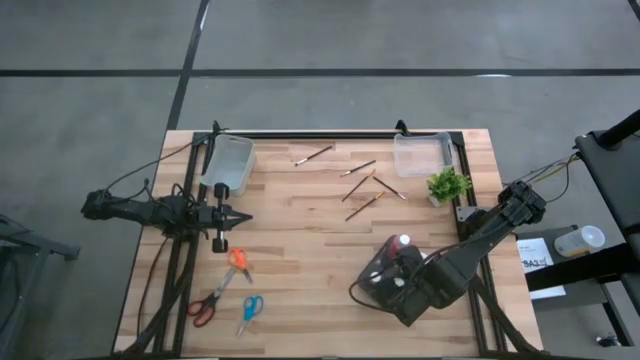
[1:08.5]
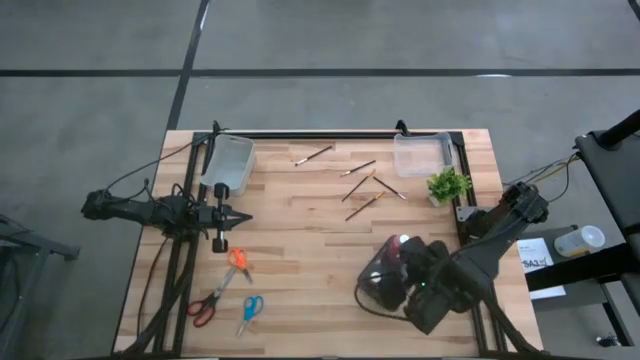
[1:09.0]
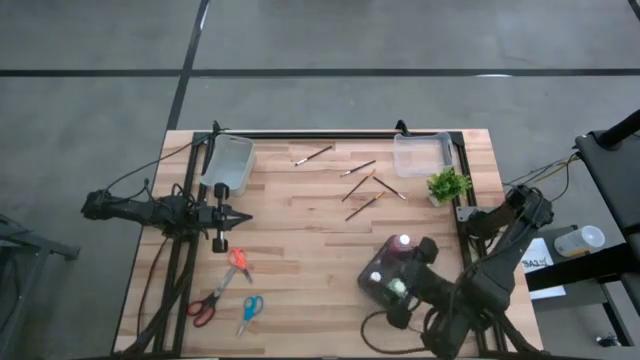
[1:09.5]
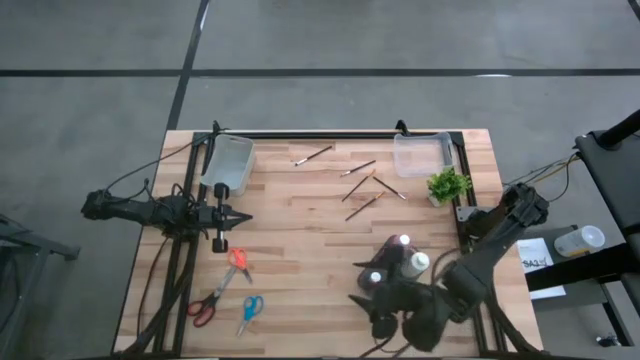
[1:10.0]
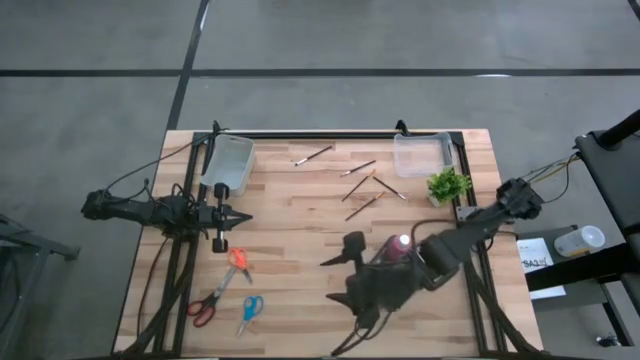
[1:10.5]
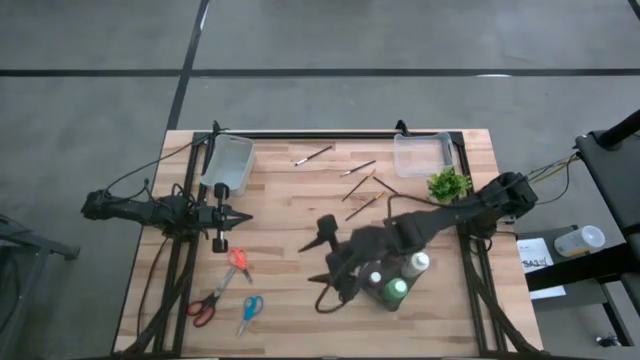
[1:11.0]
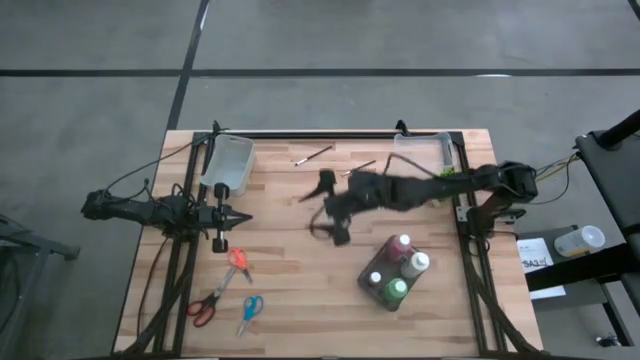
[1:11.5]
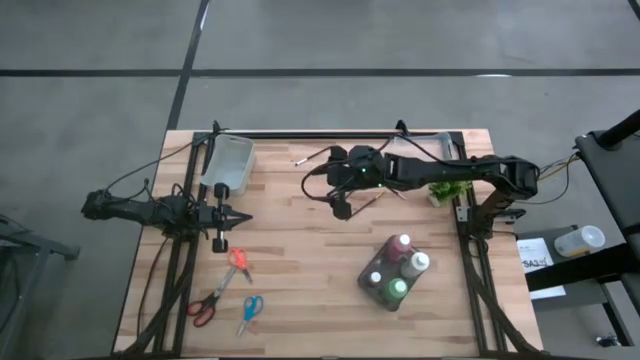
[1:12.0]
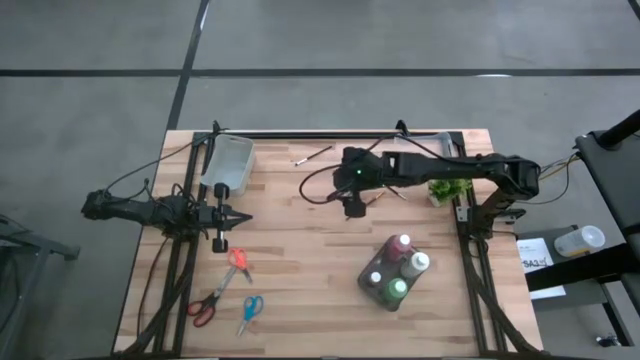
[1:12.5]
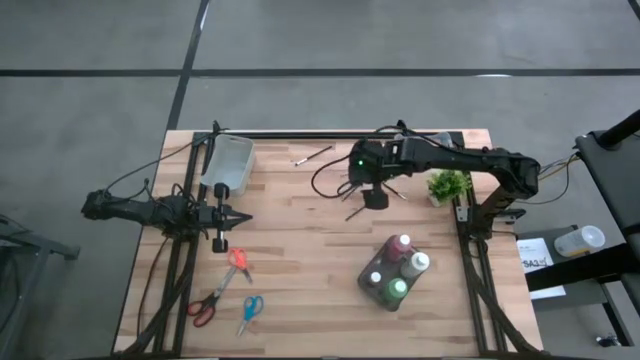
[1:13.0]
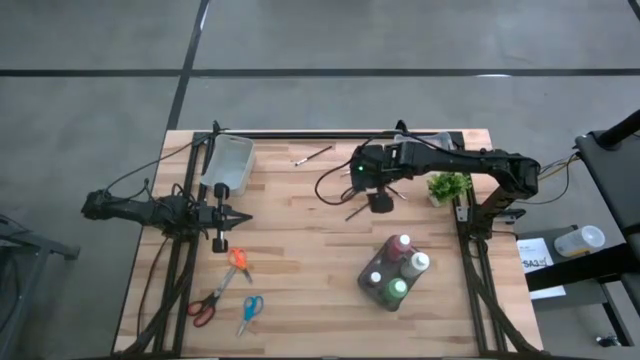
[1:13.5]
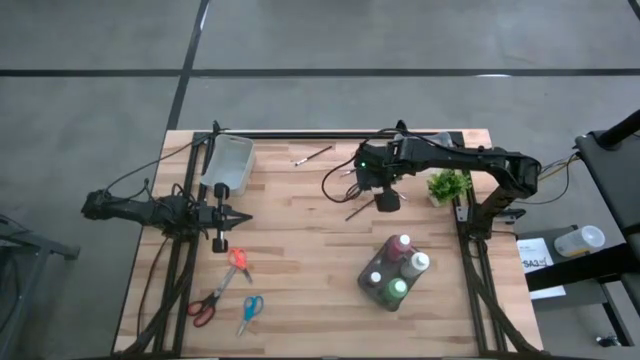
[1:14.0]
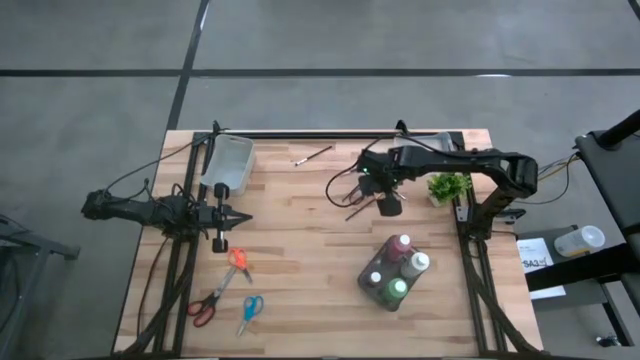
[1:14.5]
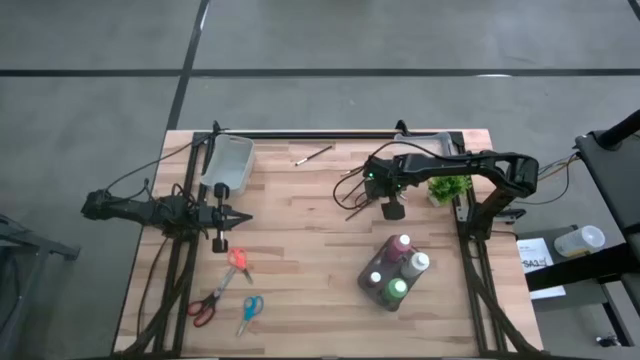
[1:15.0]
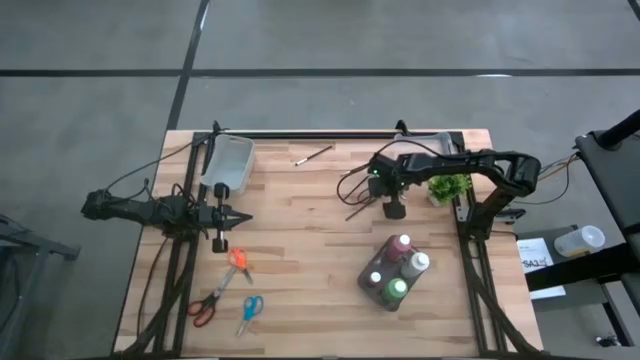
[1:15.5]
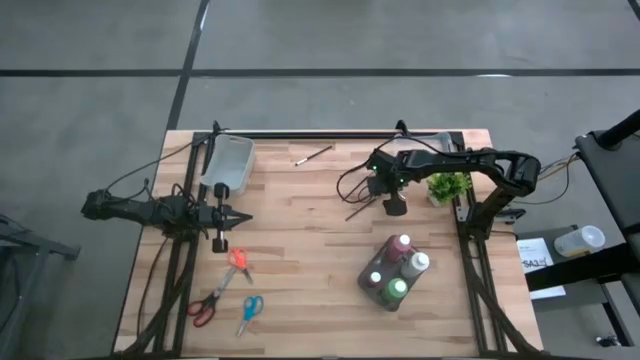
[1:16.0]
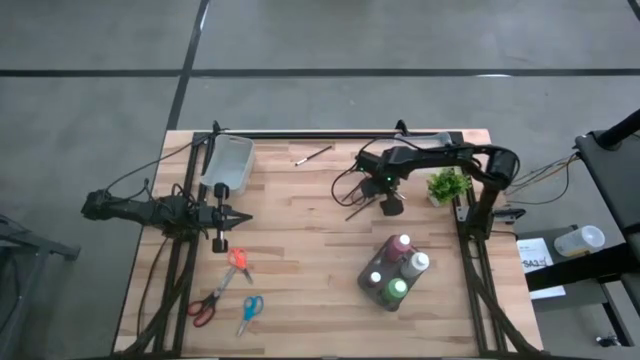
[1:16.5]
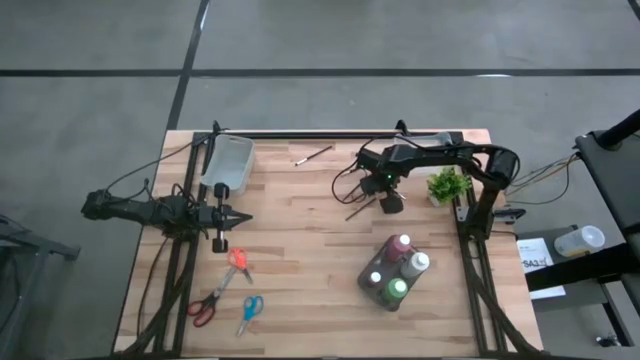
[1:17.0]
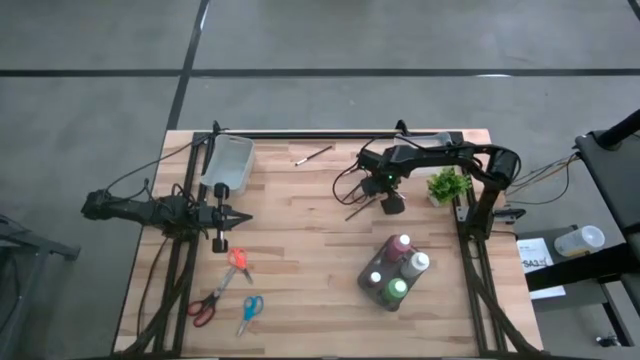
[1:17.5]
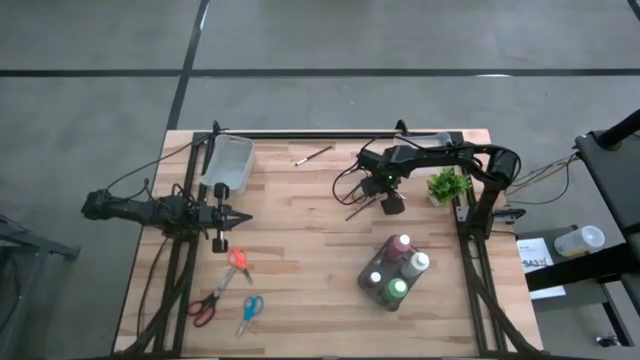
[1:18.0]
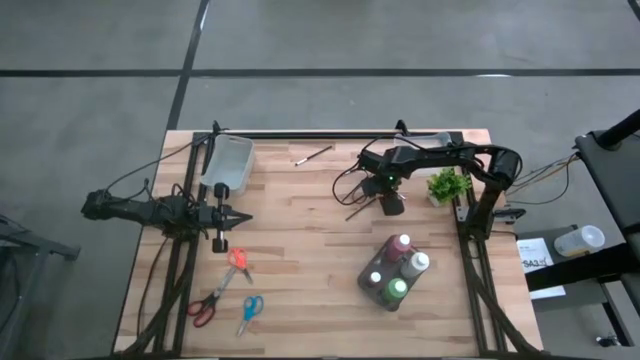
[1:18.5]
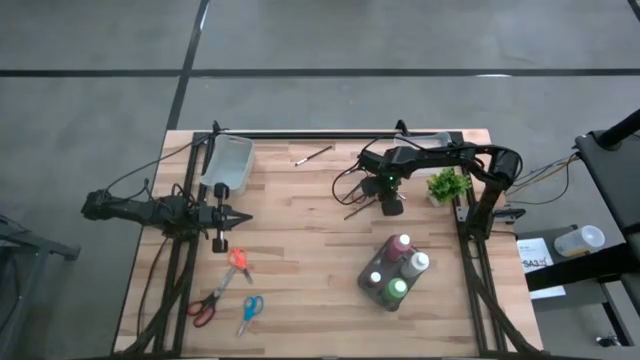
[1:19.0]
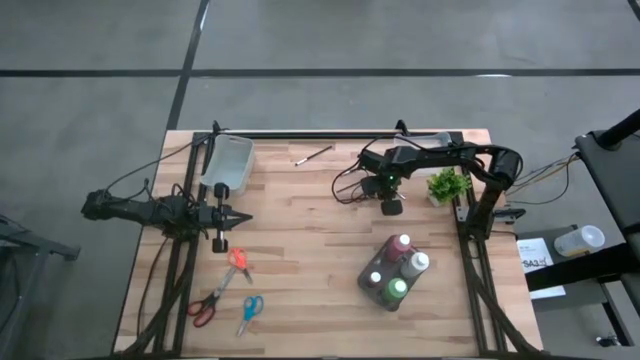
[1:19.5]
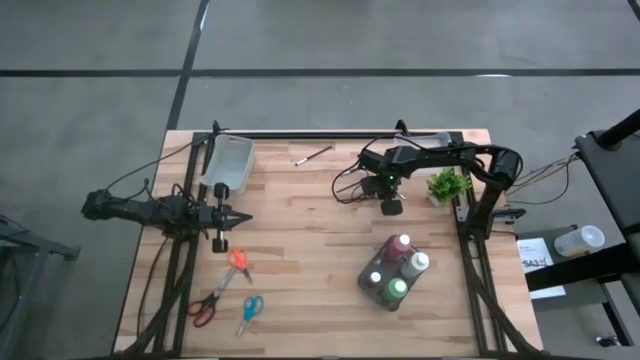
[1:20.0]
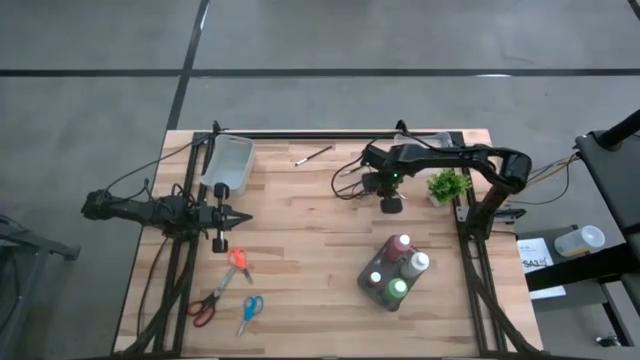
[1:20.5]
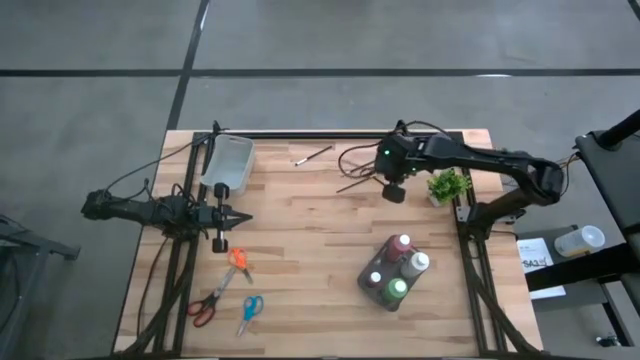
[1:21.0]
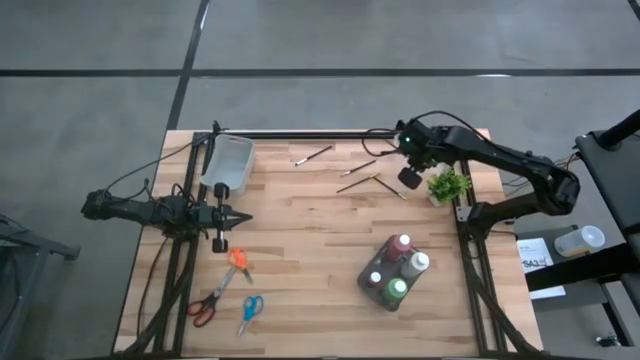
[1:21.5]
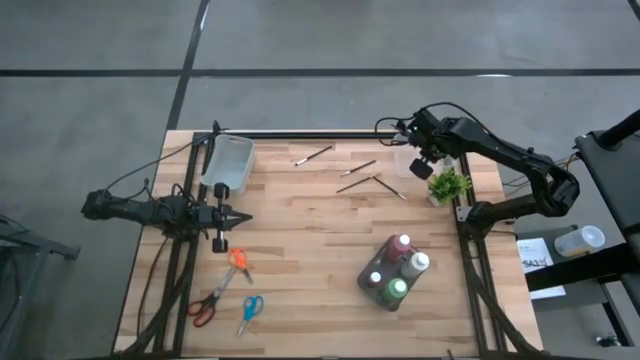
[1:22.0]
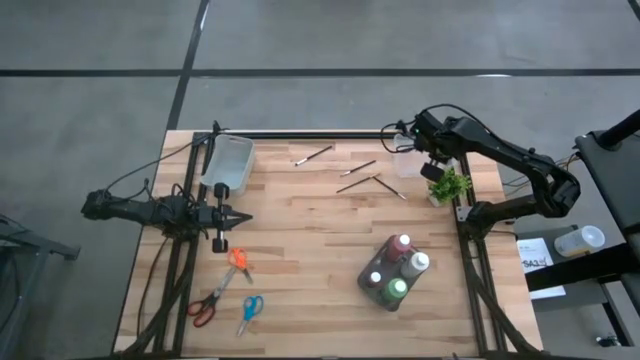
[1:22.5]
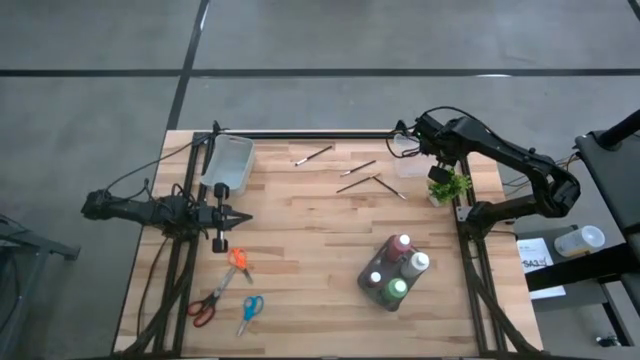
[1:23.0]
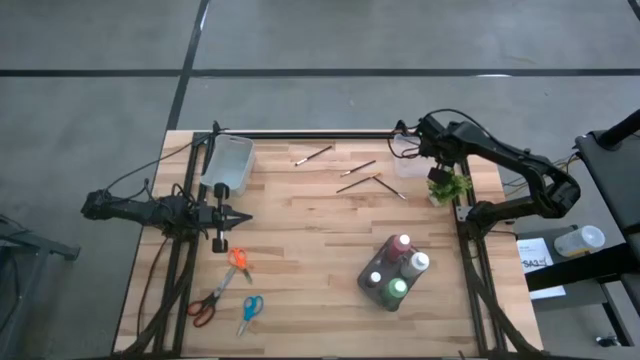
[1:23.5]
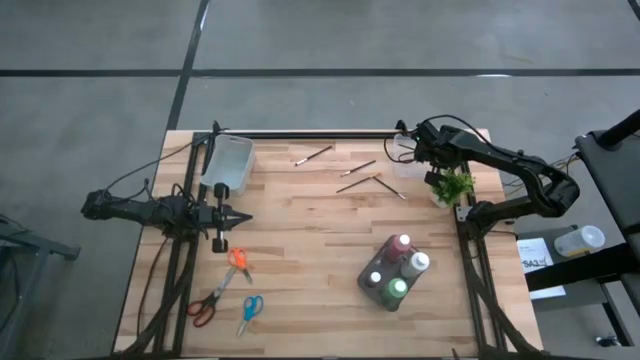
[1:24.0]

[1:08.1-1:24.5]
Task: Pick & Place Paint Supplies
Put the bottom gold paint brush into the transparent bin

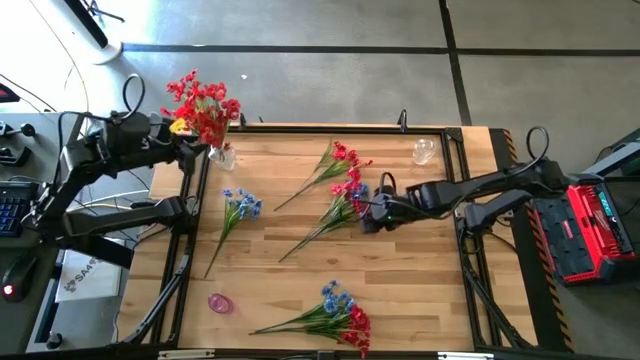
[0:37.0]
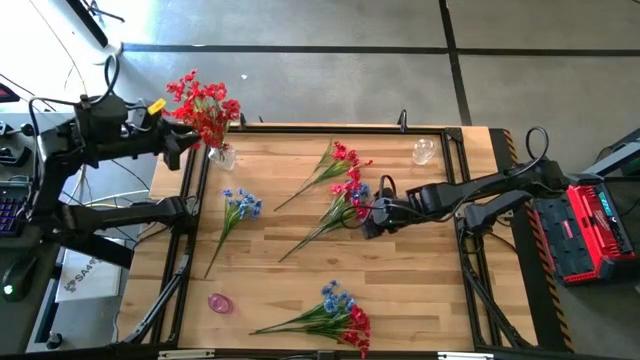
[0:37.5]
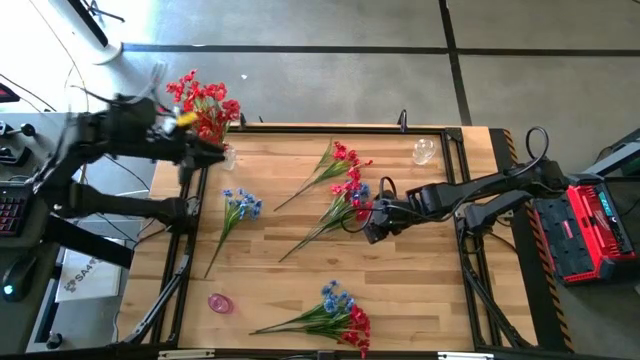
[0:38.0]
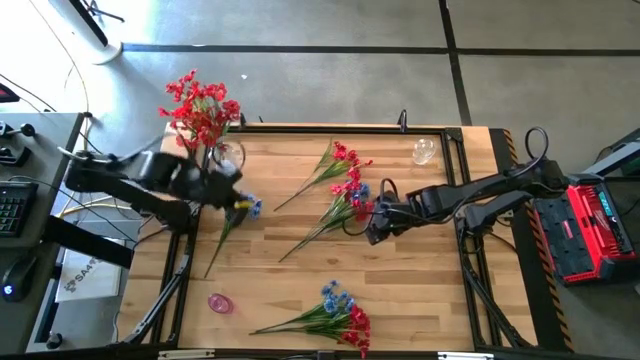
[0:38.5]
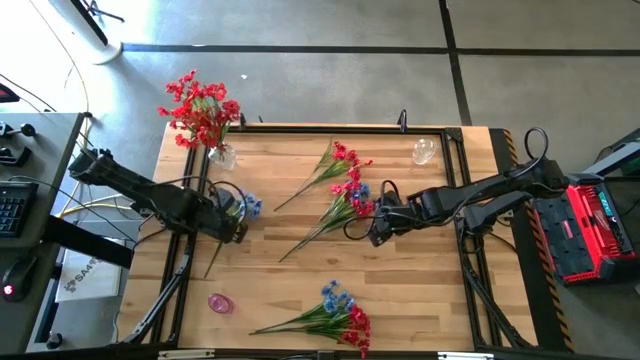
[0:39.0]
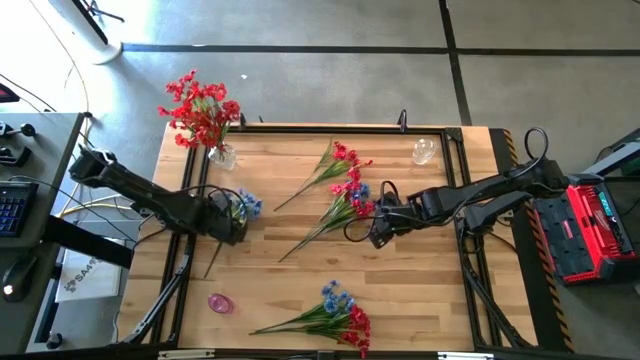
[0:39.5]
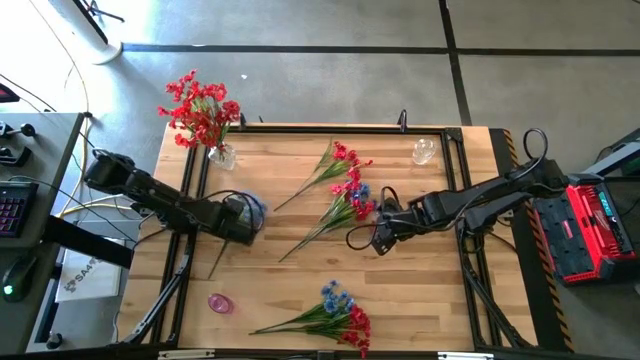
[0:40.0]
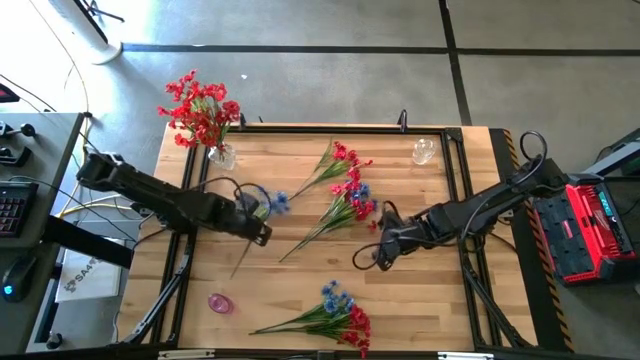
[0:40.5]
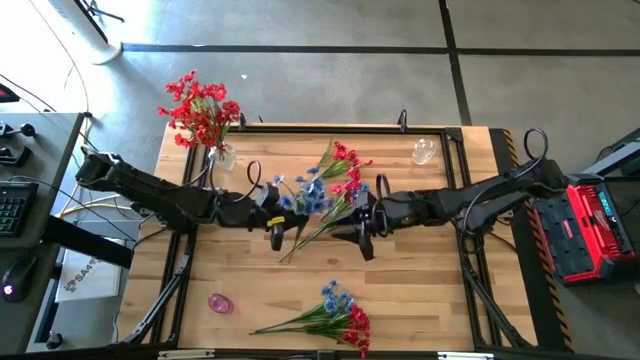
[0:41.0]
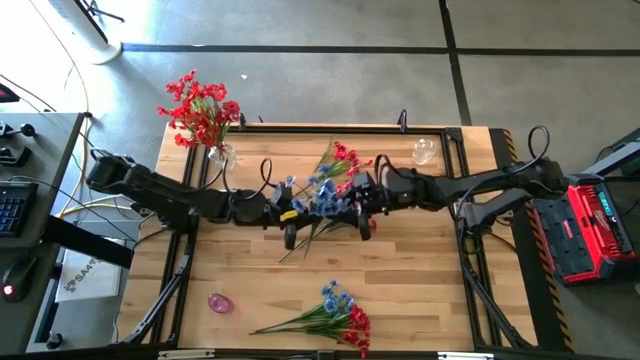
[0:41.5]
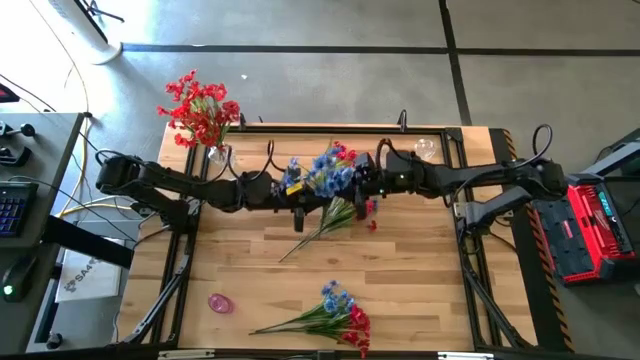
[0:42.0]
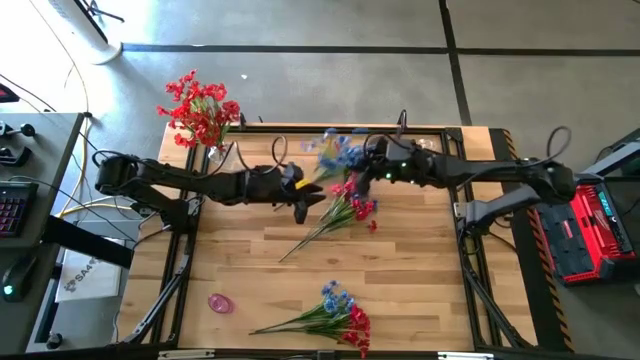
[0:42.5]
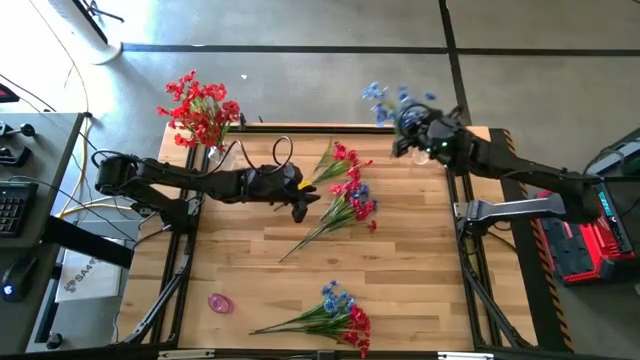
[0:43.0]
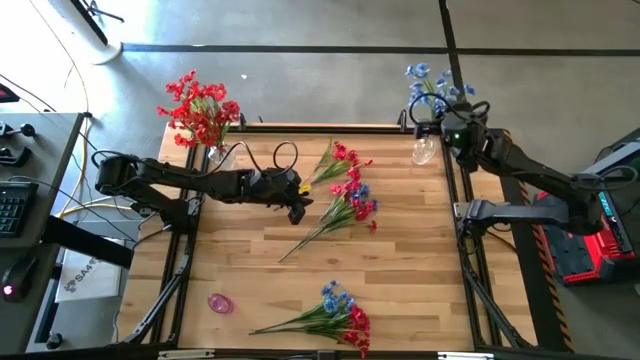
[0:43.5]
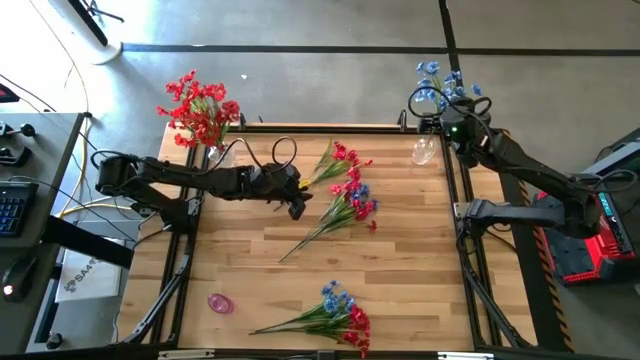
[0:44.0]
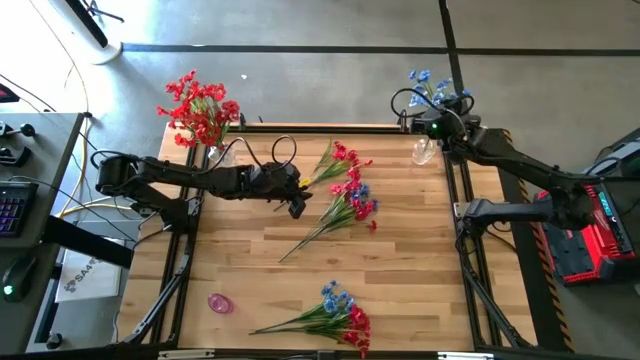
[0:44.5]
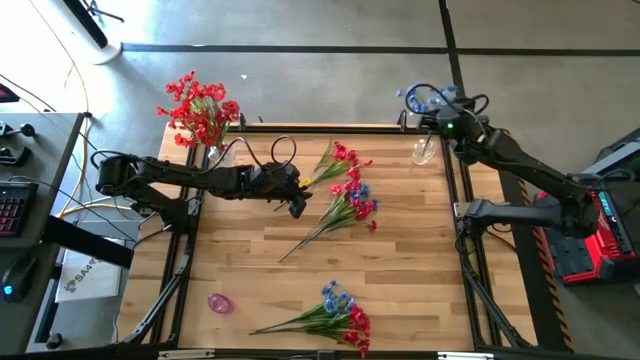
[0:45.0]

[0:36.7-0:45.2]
Task: Sort flowers into vase by color
Put the top left blue flower into the right transparent vase
